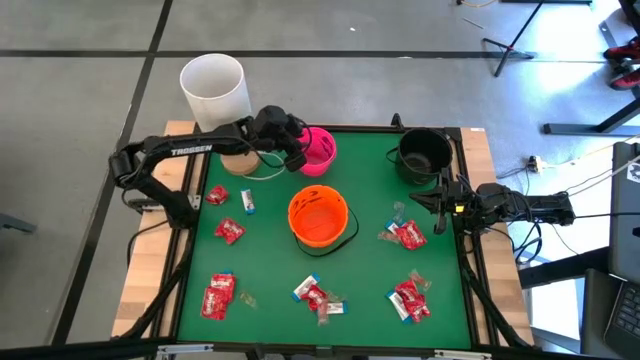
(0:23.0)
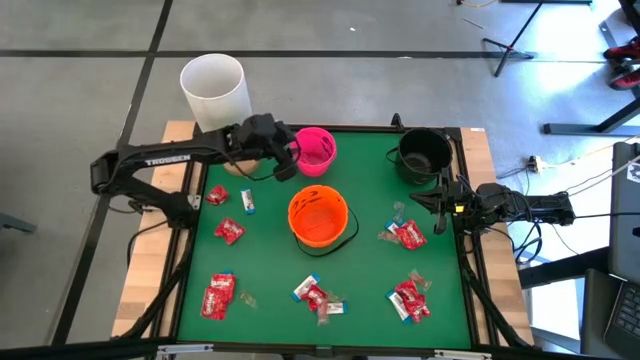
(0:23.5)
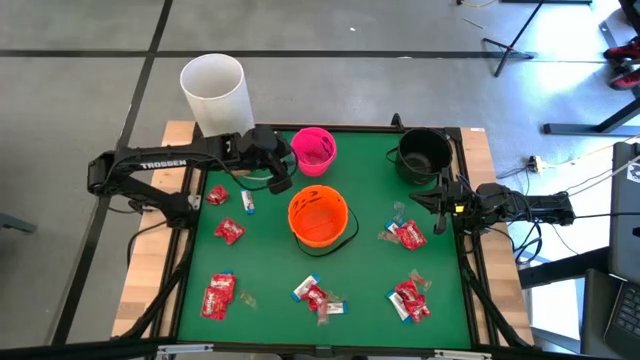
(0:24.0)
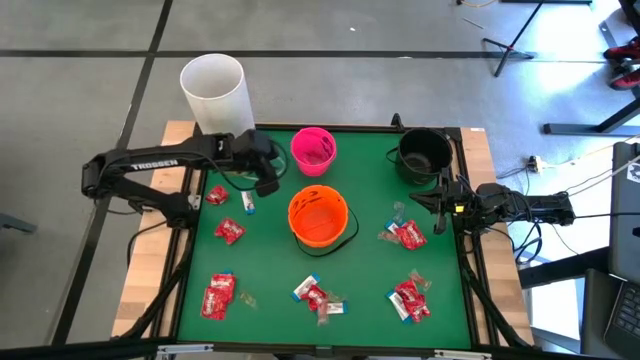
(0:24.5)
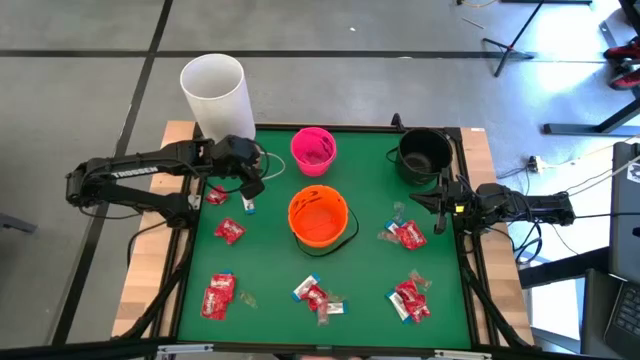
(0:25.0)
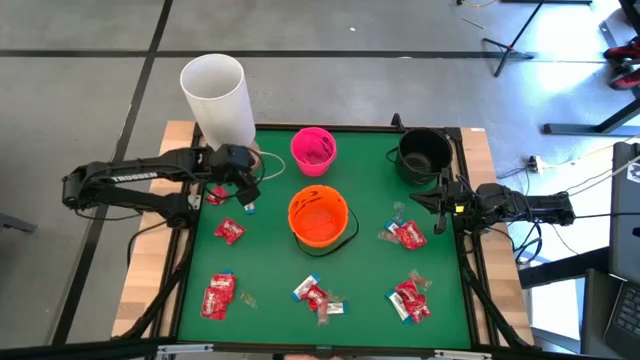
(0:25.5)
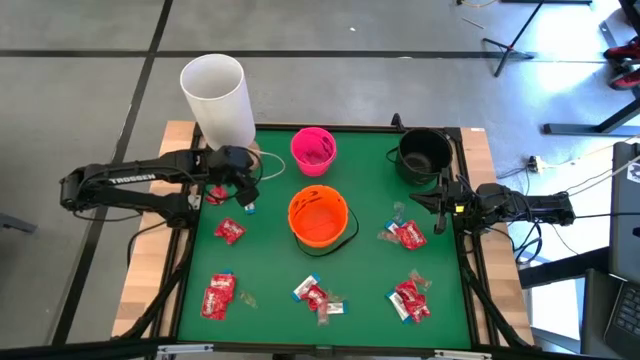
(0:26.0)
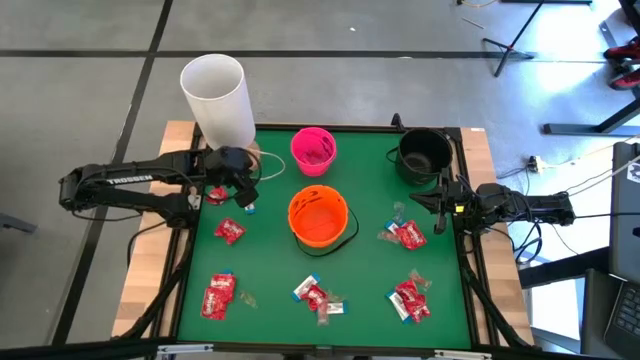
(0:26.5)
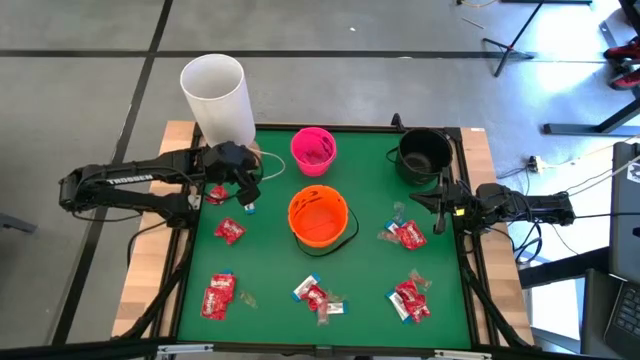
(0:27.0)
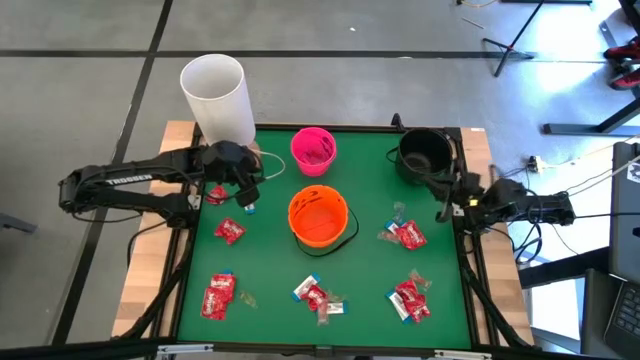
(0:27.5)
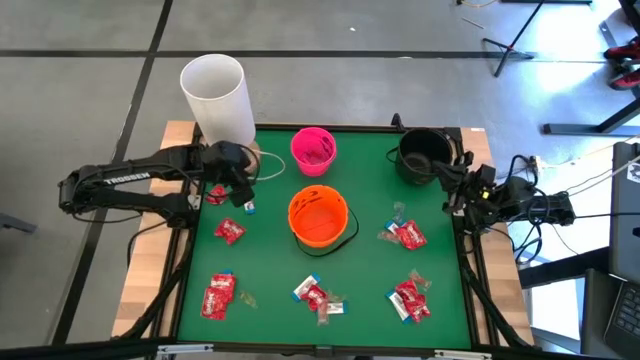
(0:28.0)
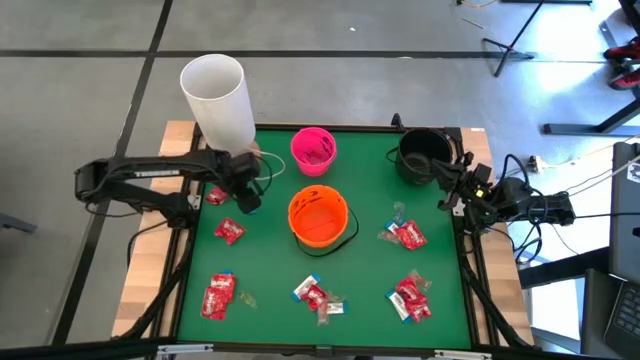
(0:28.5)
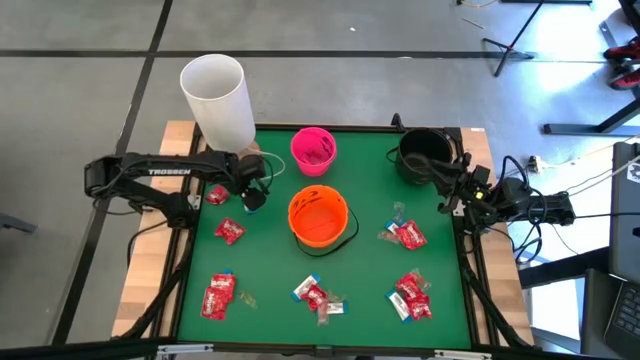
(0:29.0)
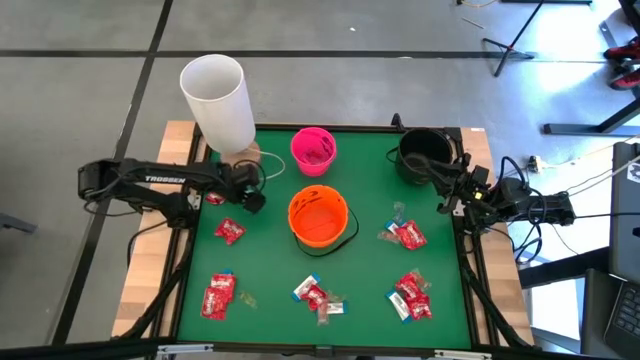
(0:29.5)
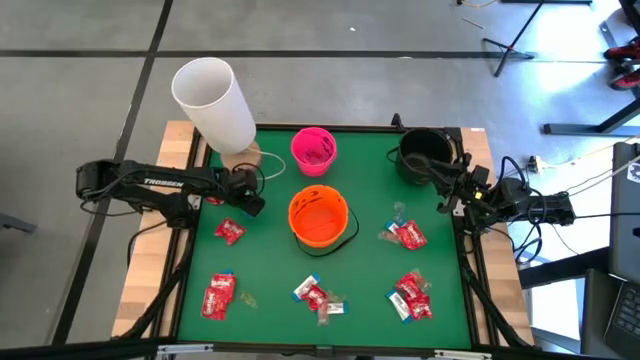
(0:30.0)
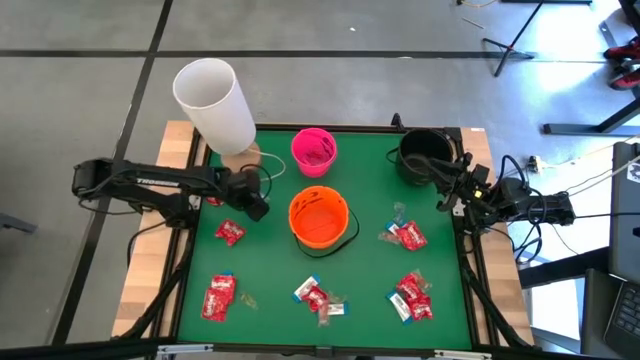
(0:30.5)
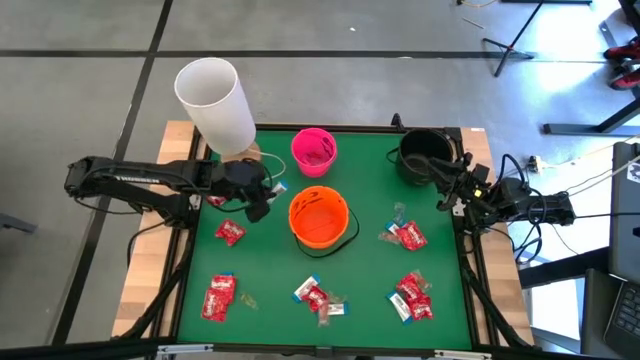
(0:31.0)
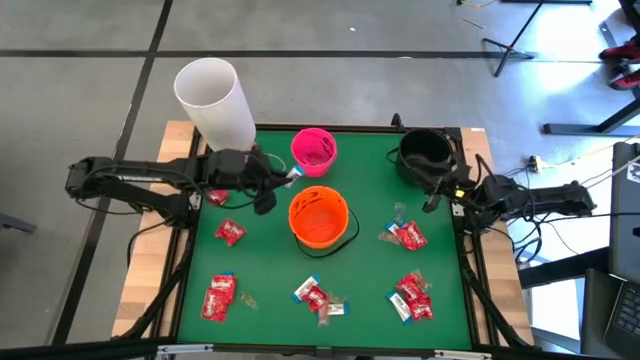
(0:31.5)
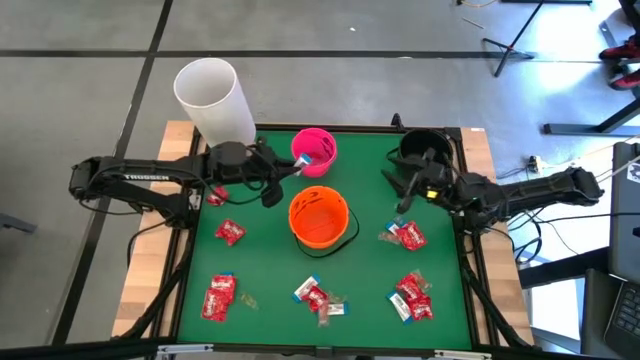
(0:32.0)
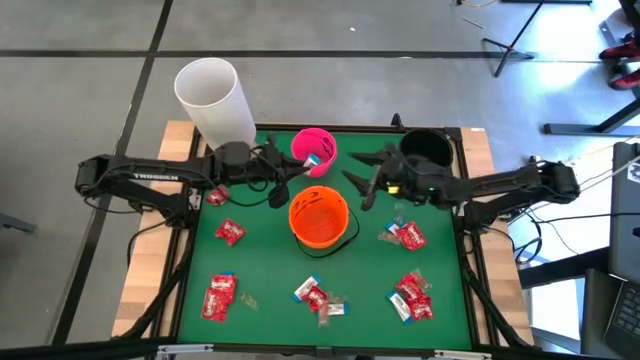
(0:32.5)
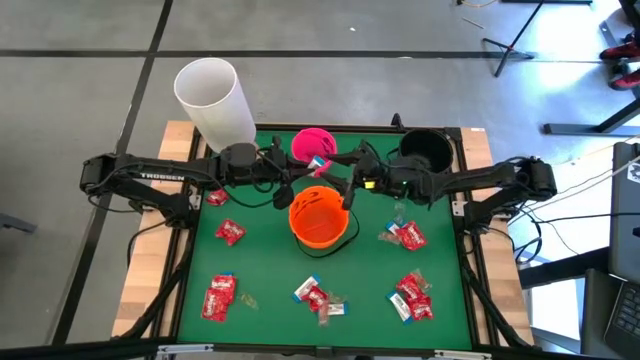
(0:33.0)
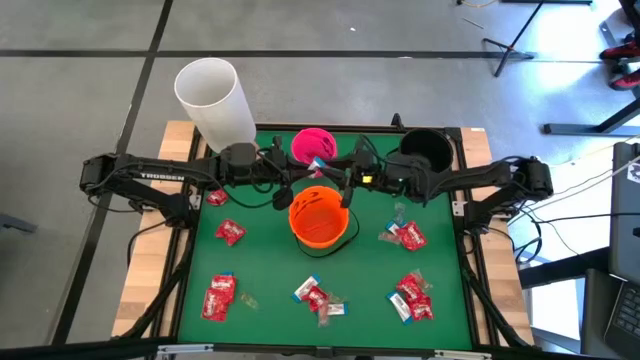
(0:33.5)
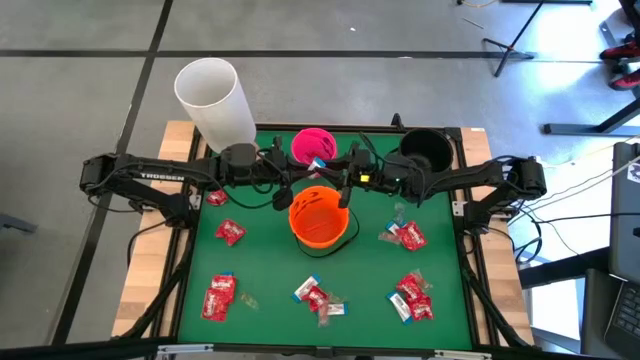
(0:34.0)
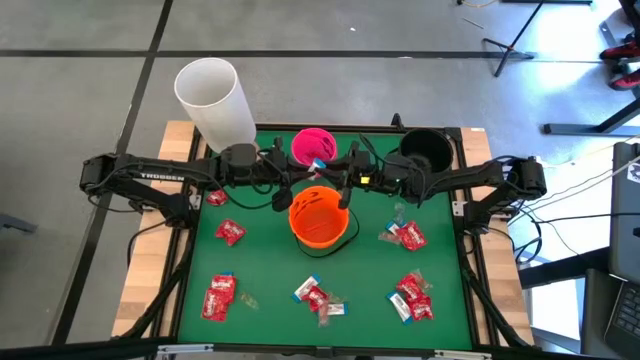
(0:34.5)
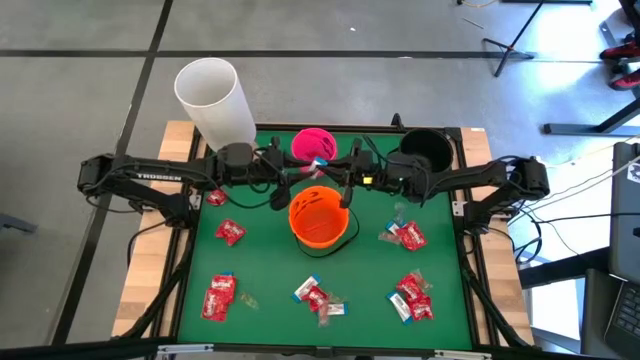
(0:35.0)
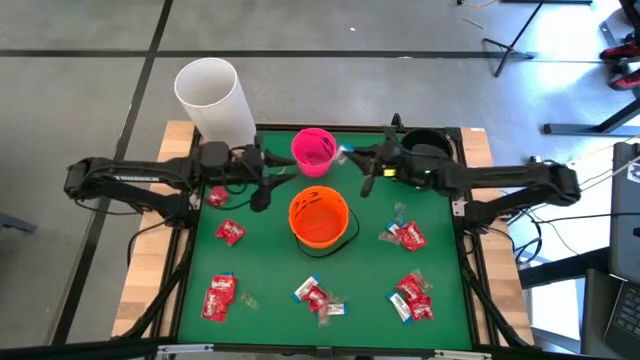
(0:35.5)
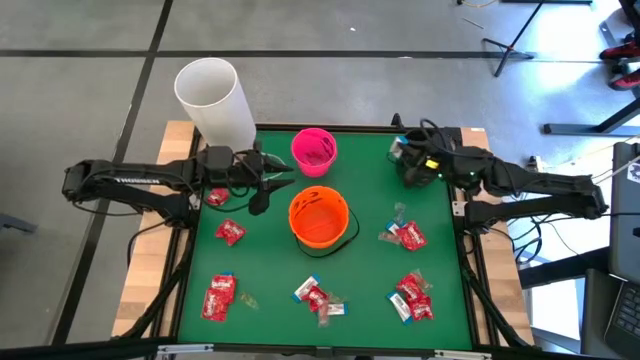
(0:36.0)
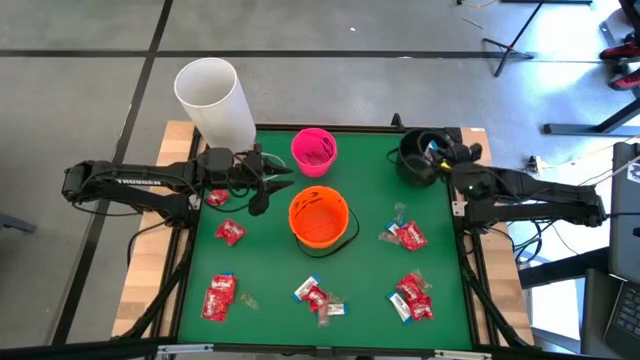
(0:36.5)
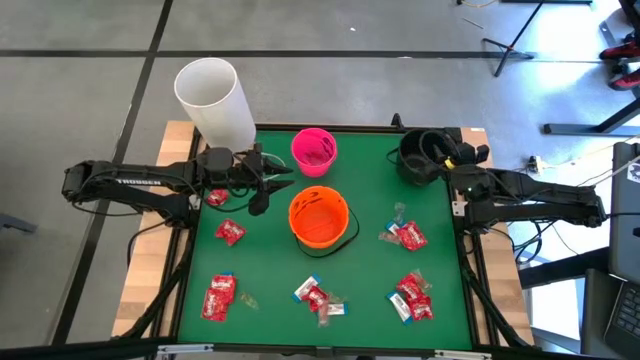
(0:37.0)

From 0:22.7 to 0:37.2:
Task: Sort candy
Put the white candy into the black bucket

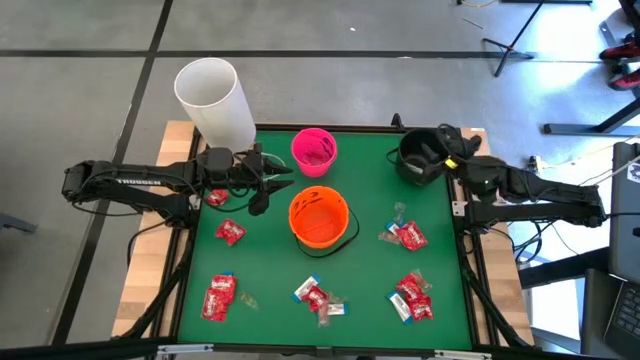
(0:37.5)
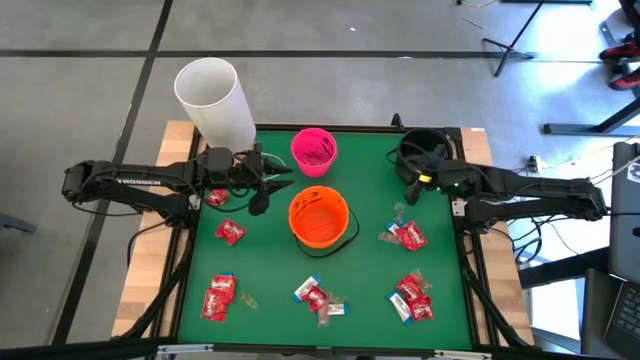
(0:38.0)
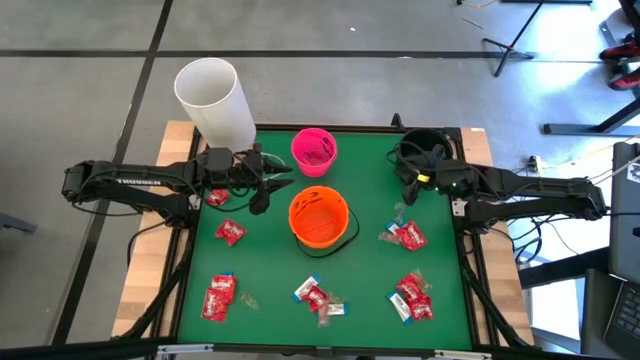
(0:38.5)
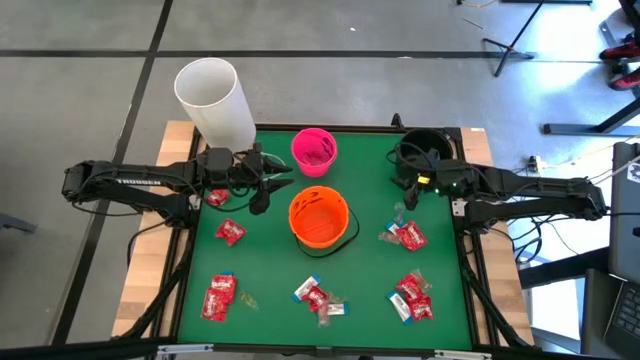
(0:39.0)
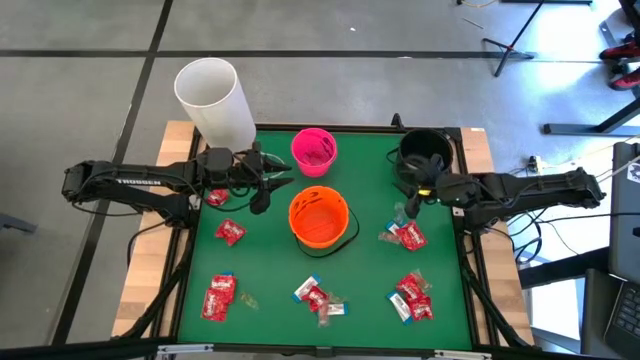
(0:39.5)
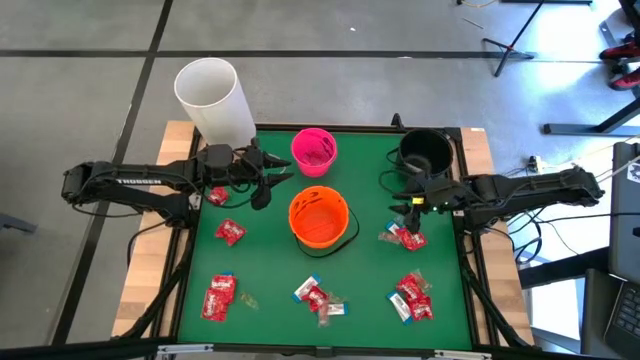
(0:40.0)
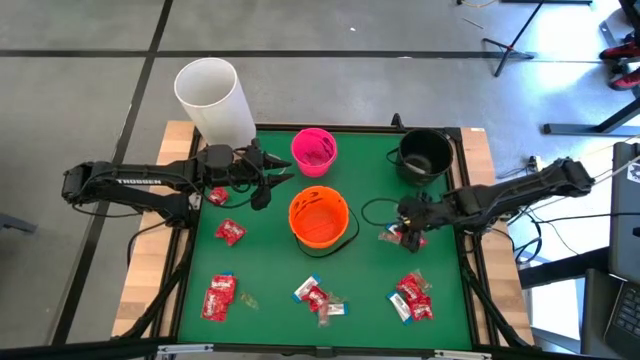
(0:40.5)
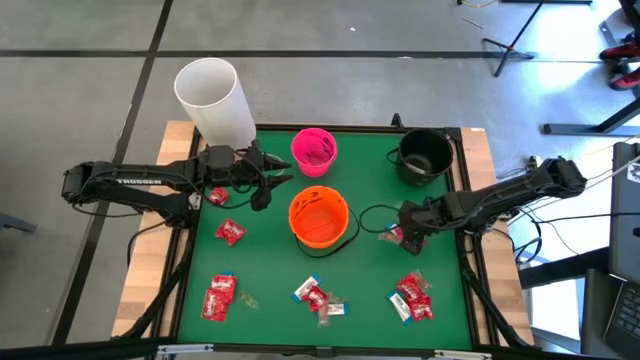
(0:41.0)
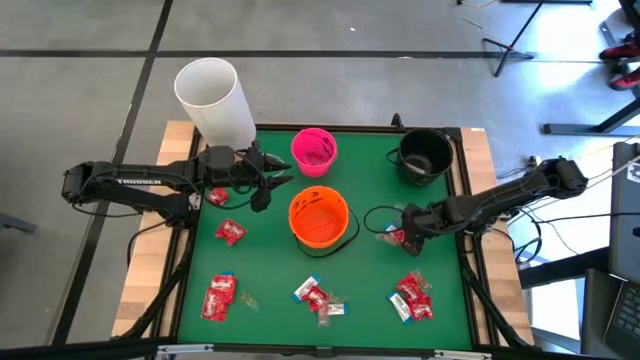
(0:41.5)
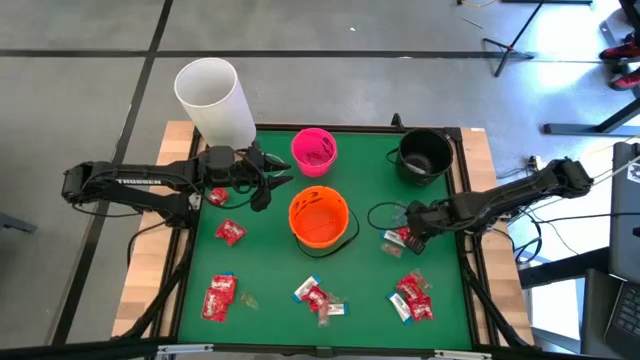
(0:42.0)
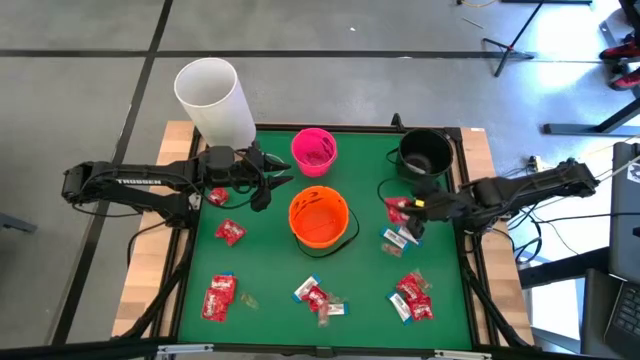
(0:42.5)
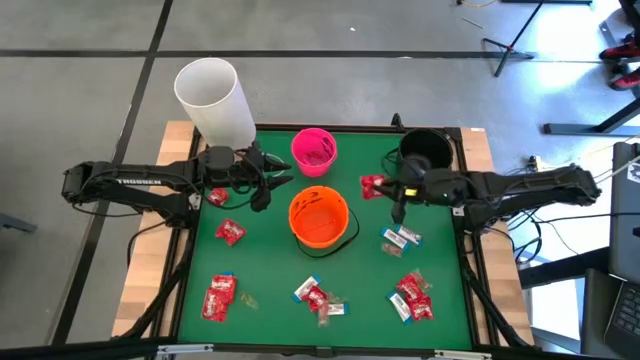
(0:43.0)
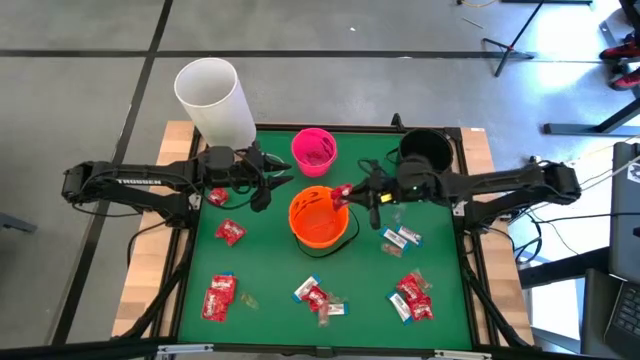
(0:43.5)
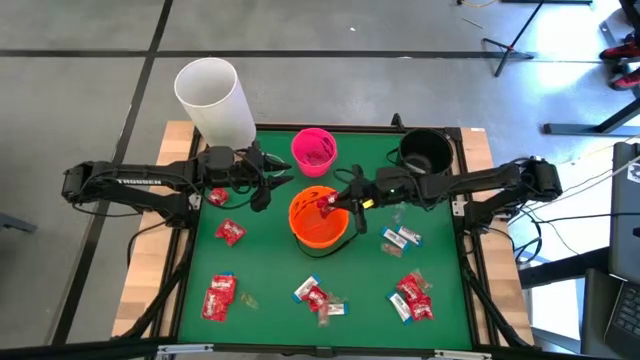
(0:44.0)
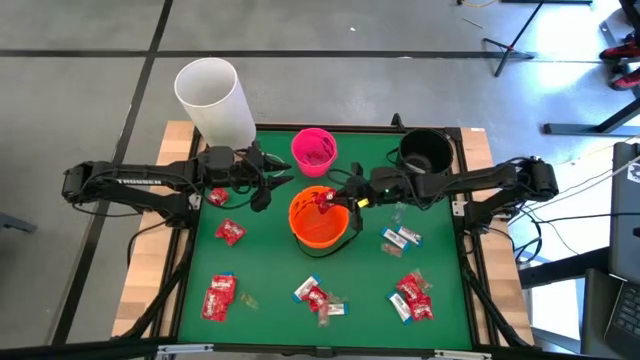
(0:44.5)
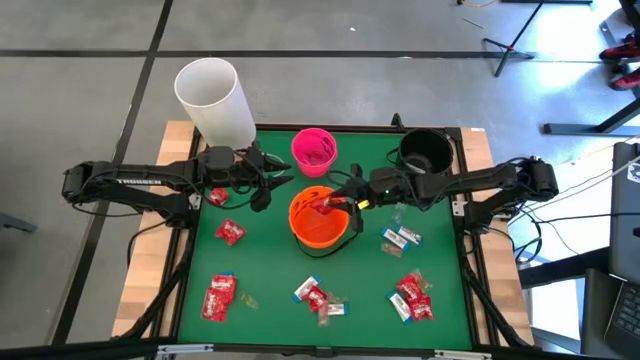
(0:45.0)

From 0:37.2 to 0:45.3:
Put the red candy into the orange bucket
